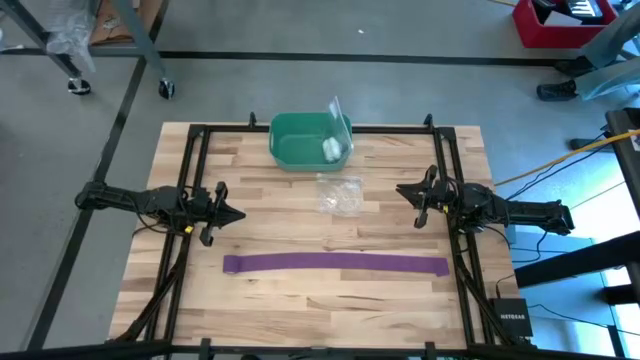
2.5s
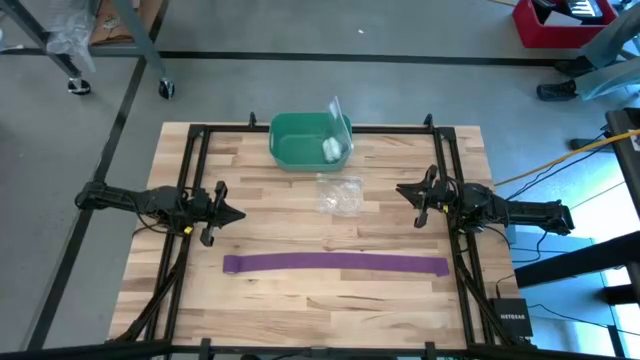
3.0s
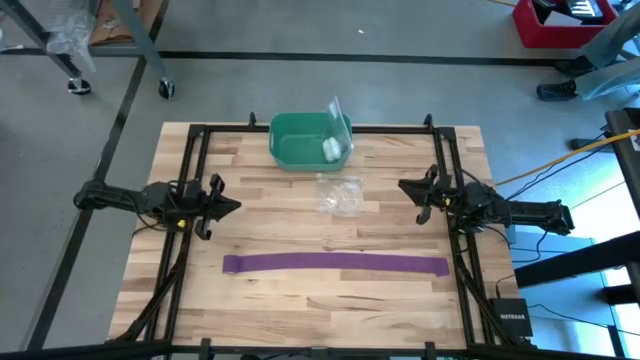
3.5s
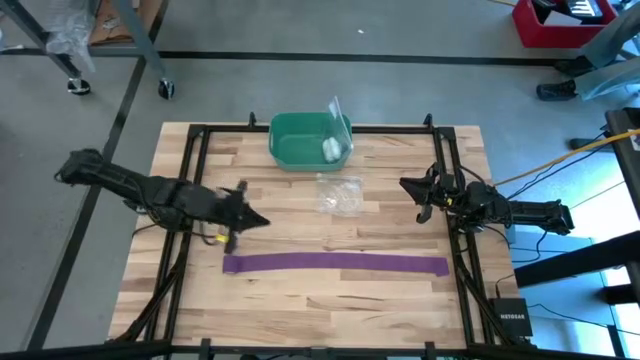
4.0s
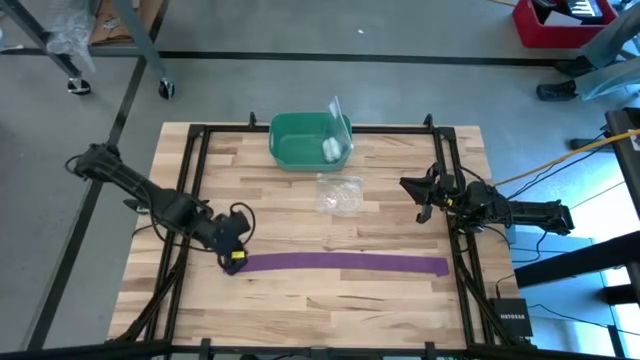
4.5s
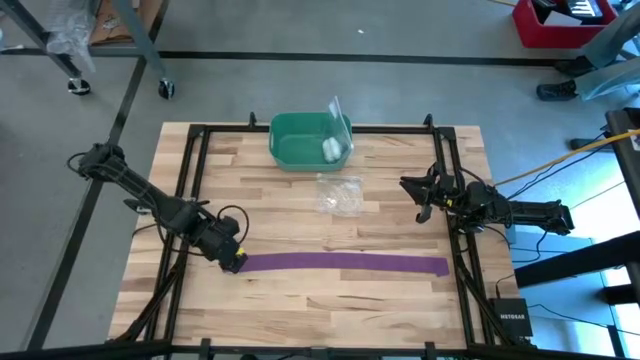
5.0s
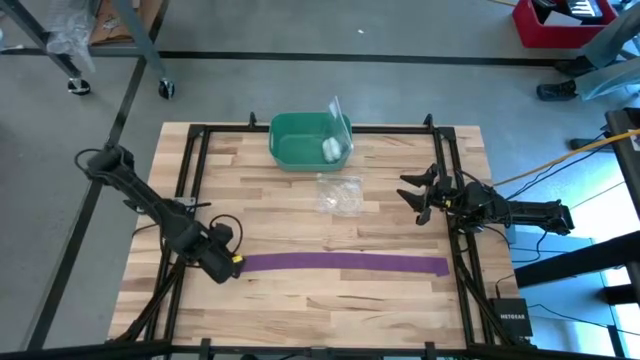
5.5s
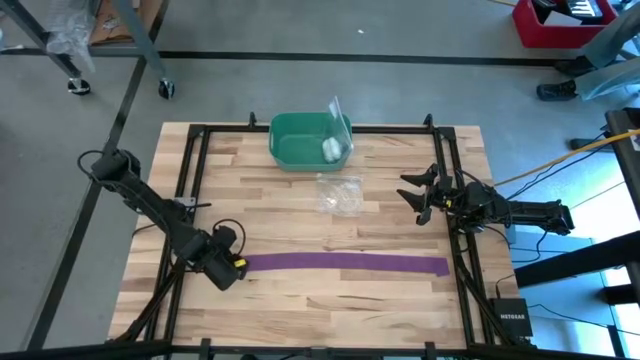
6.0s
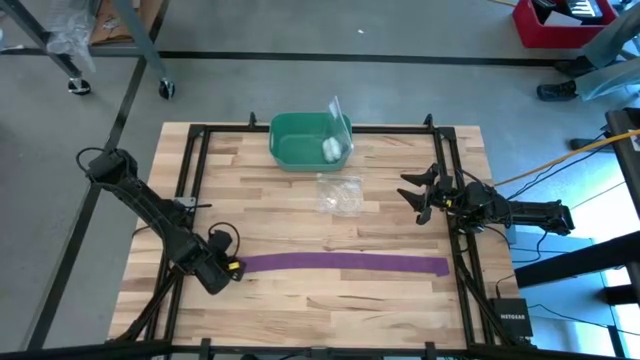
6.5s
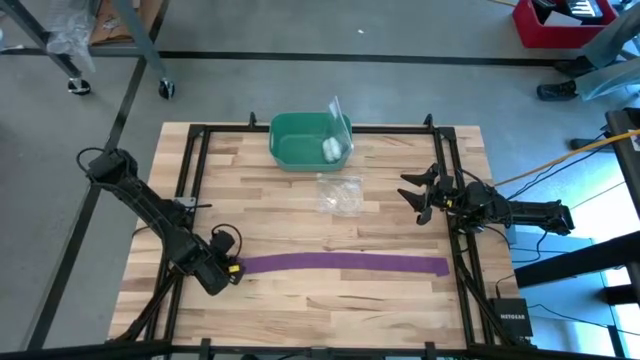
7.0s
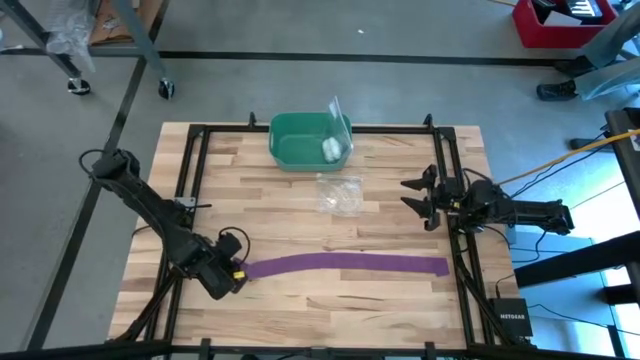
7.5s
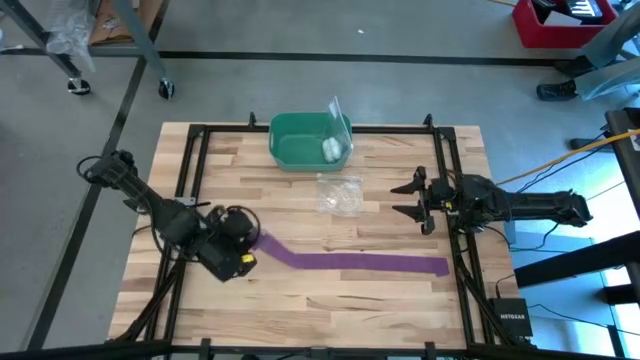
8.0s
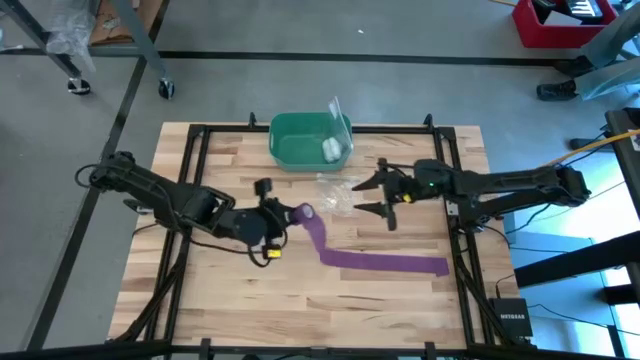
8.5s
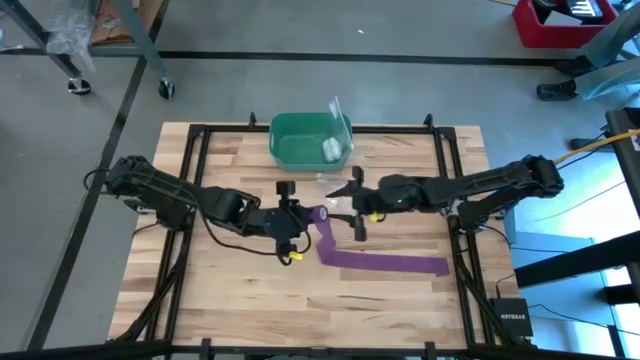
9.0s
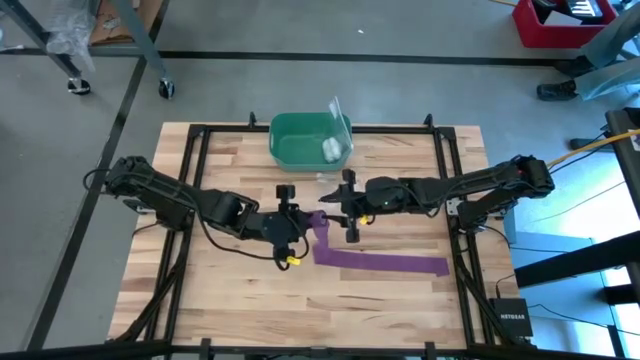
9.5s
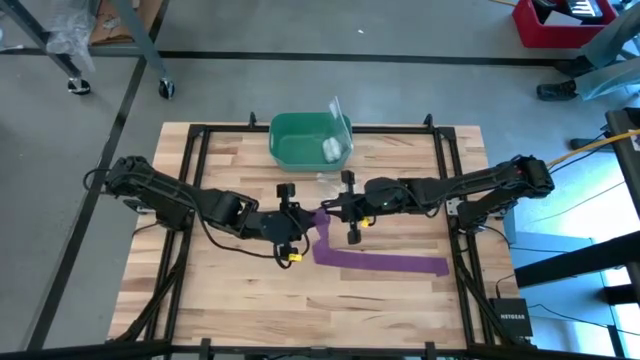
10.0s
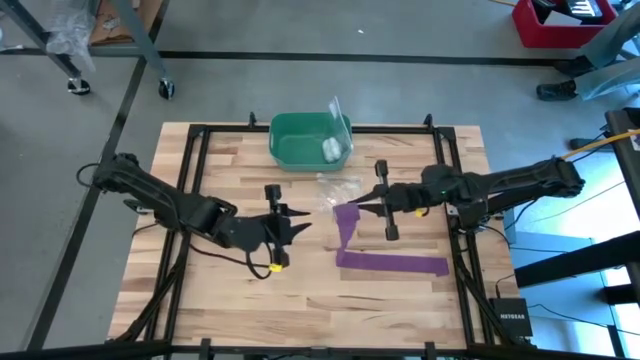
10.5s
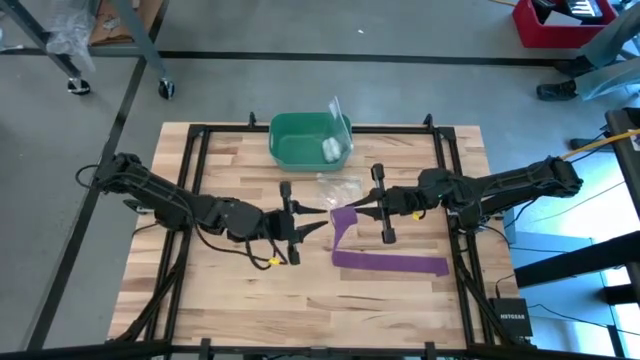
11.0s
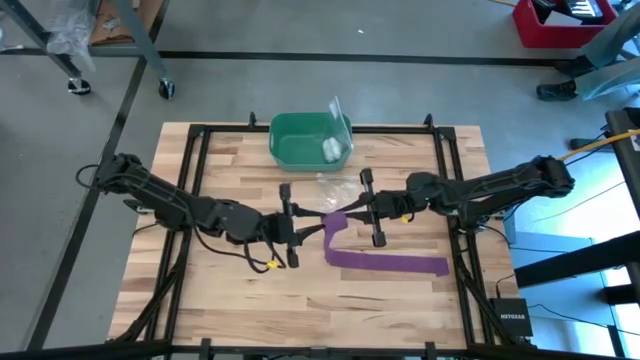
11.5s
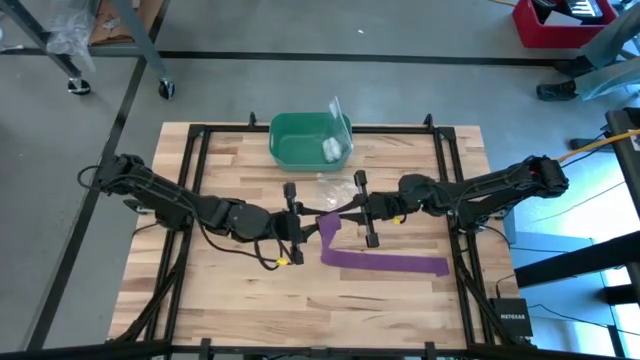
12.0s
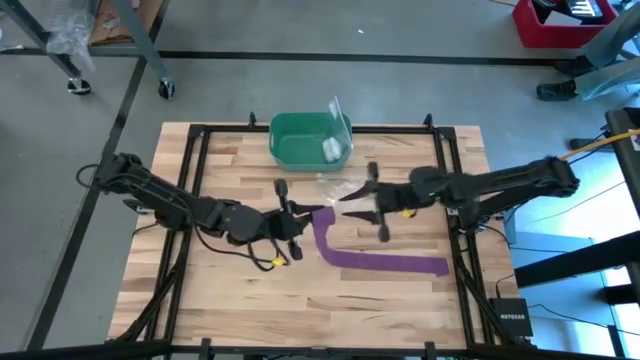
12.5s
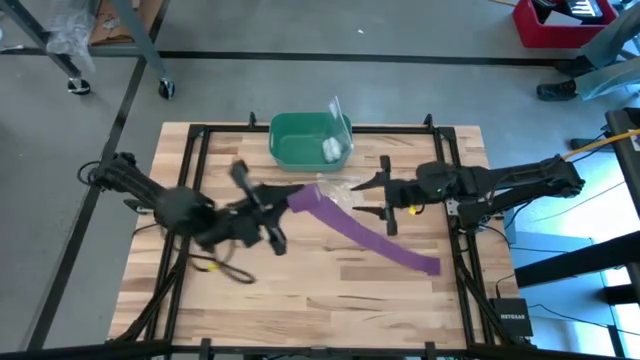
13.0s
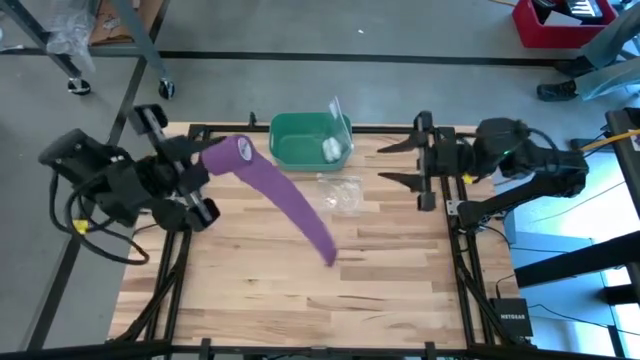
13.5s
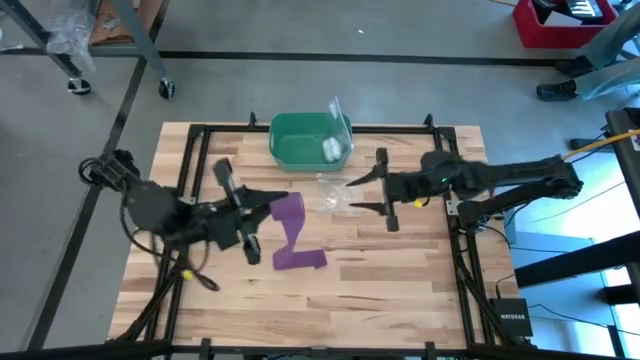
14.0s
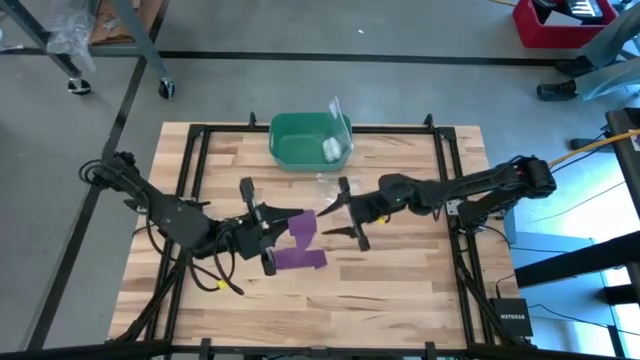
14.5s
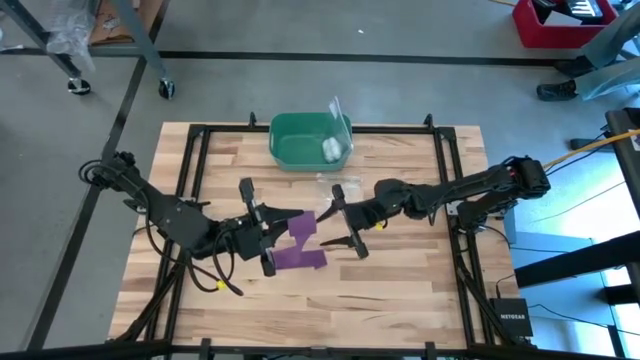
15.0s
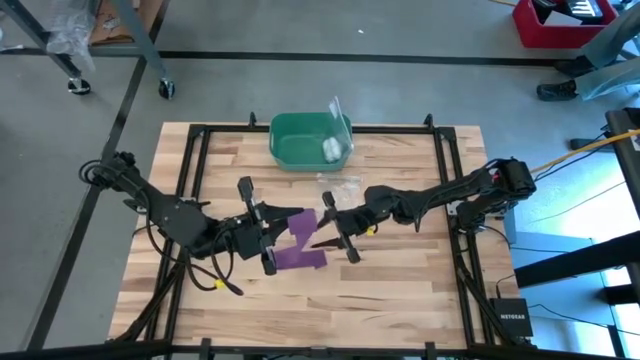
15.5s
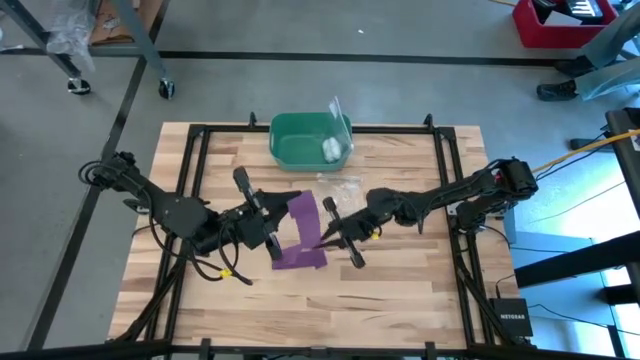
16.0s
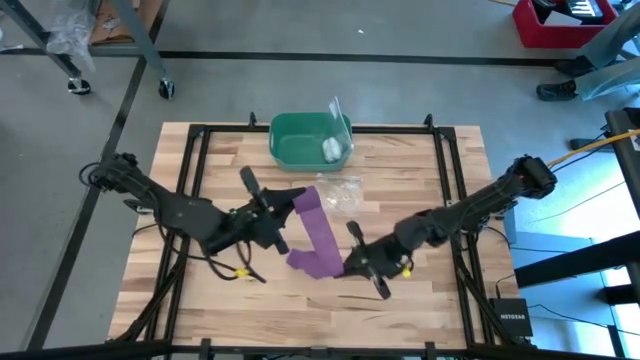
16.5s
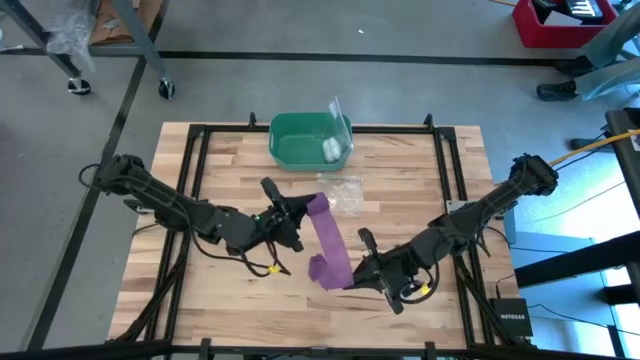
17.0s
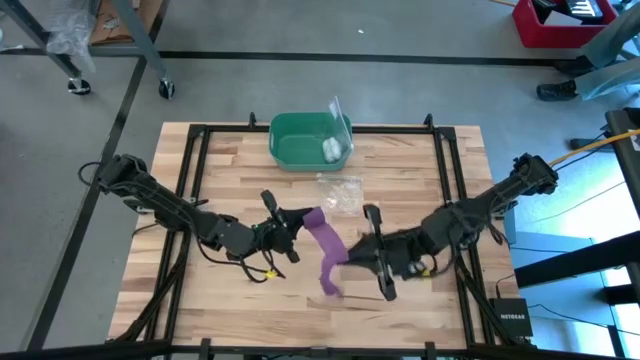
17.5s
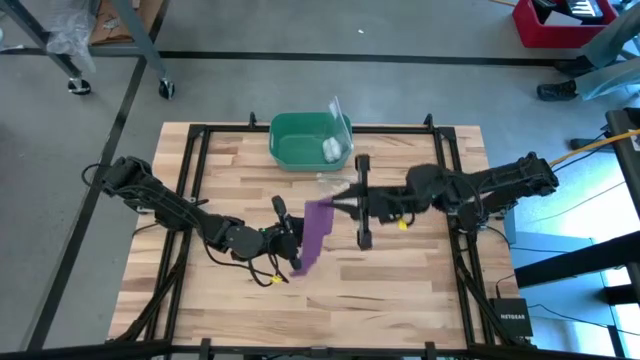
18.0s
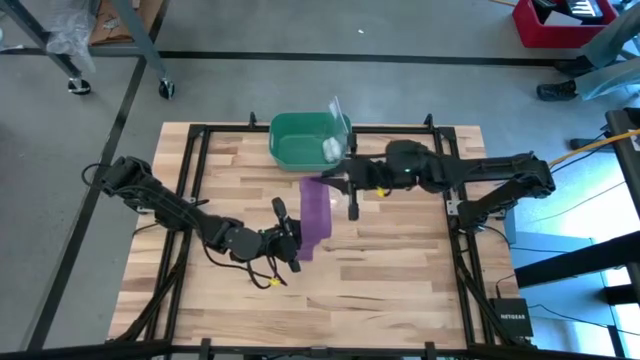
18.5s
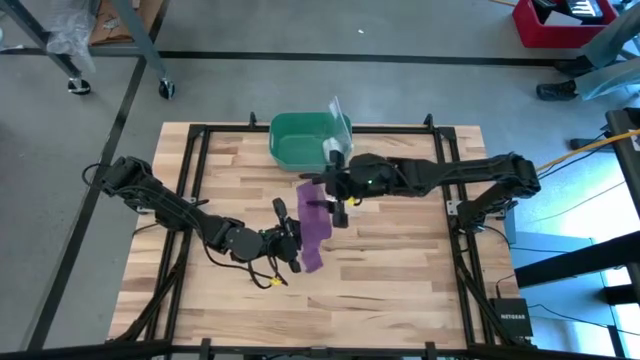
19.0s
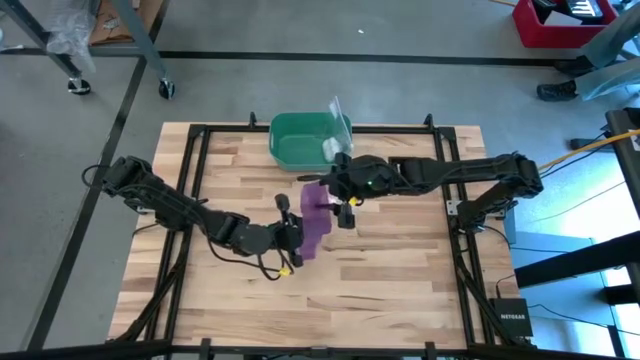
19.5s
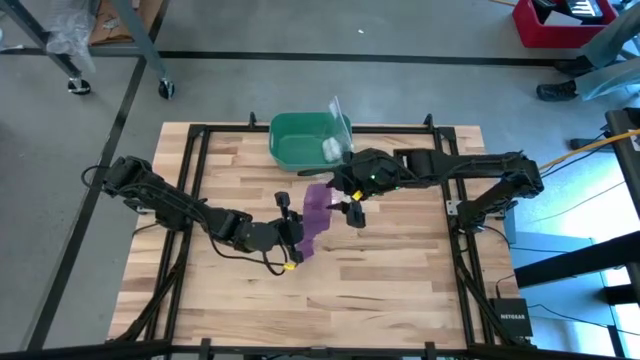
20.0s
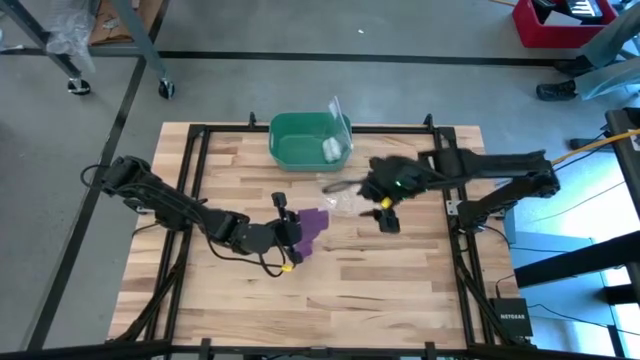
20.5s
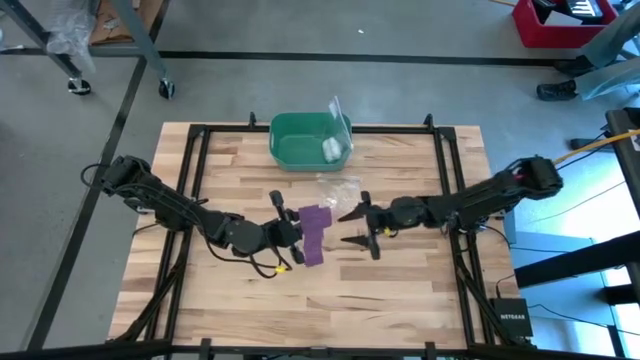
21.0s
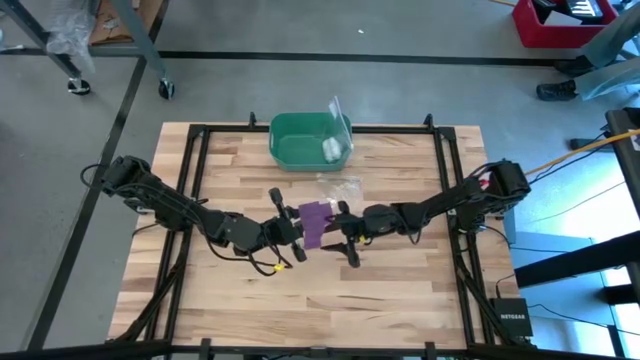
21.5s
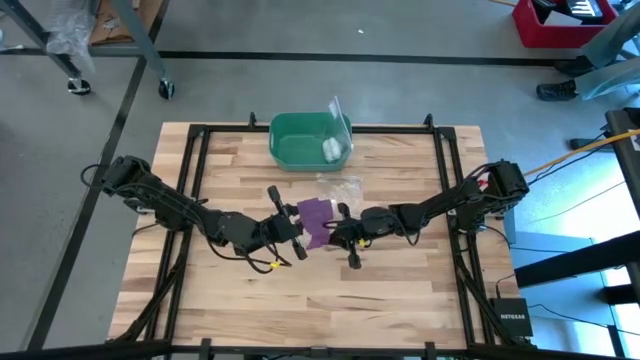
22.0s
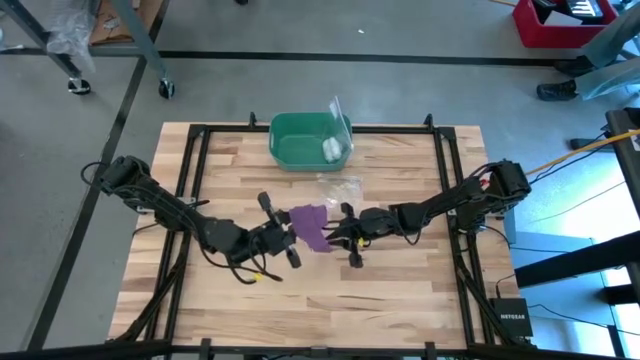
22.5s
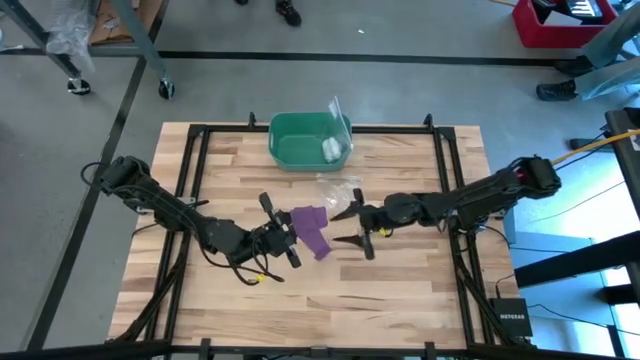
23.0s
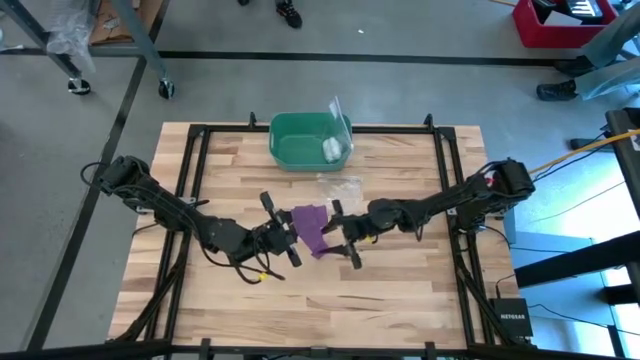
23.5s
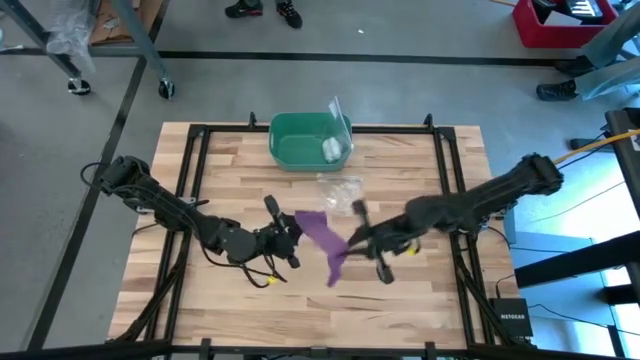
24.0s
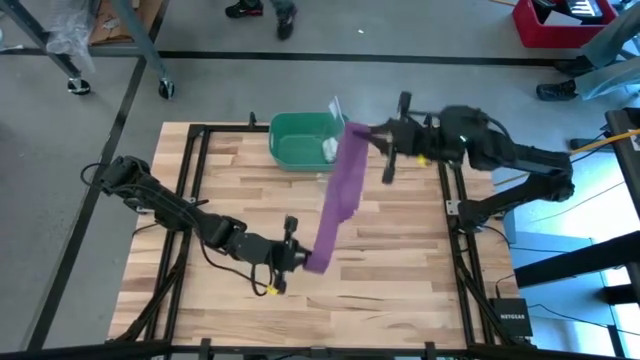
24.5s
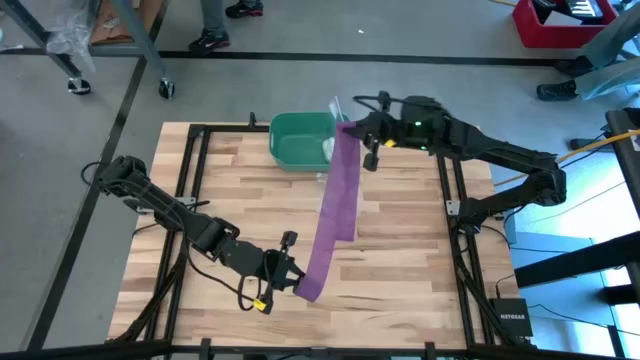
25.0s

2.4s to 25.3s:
Task: Roll bandage
Roll the violet bandage
